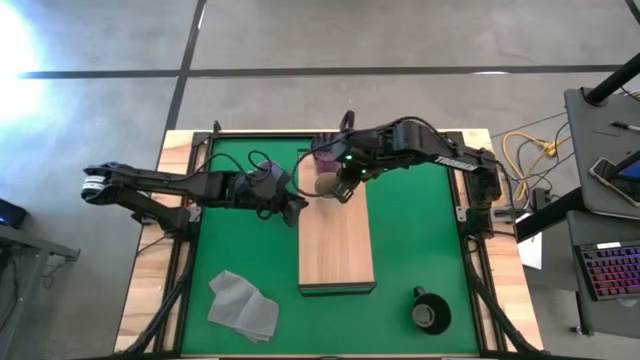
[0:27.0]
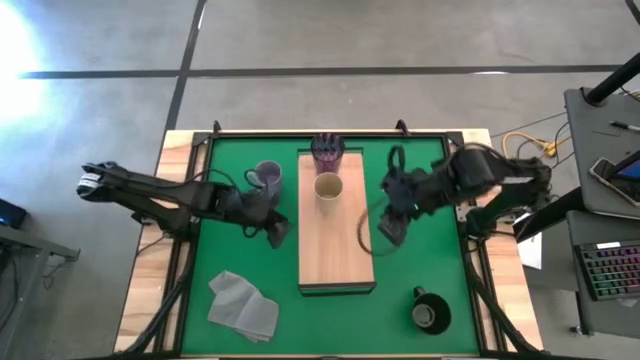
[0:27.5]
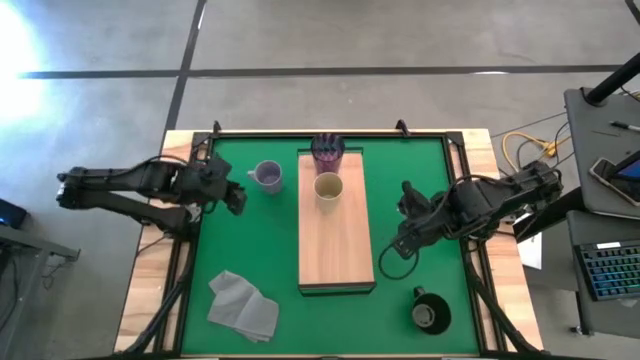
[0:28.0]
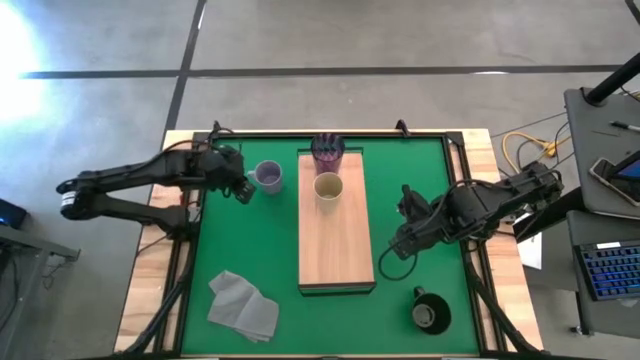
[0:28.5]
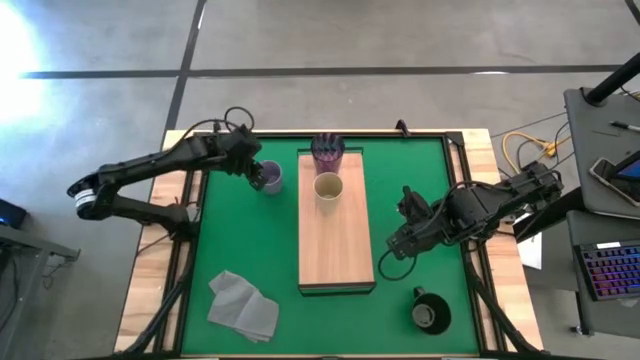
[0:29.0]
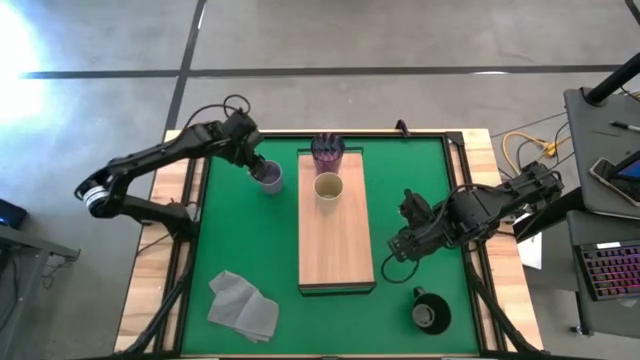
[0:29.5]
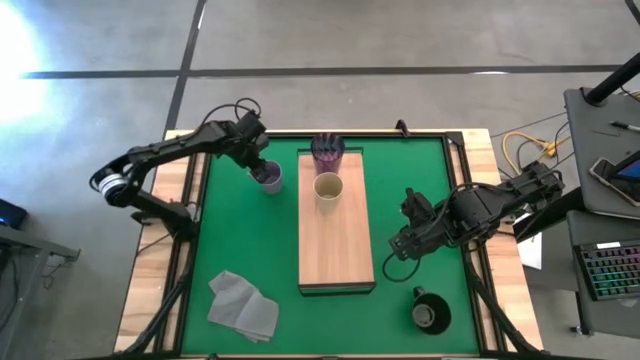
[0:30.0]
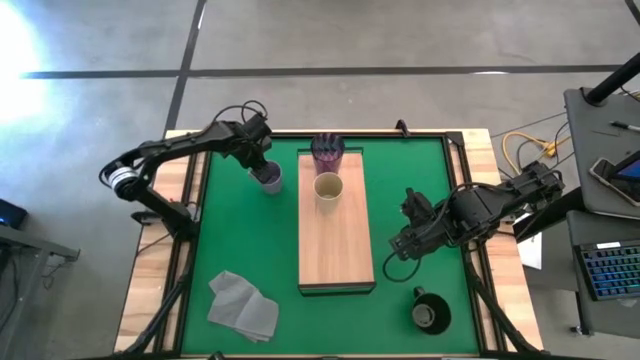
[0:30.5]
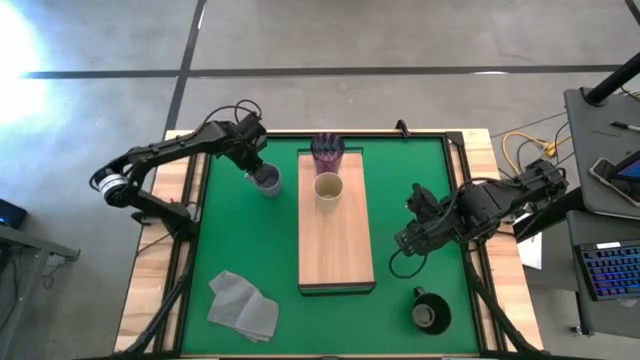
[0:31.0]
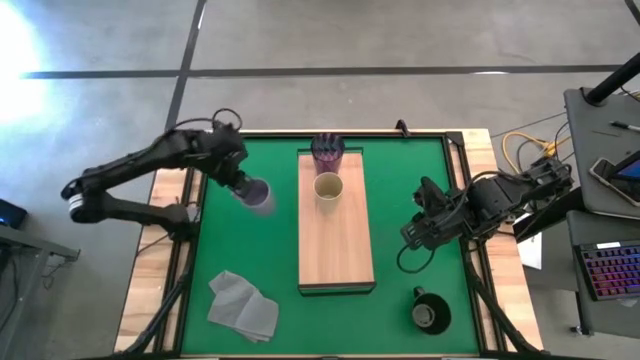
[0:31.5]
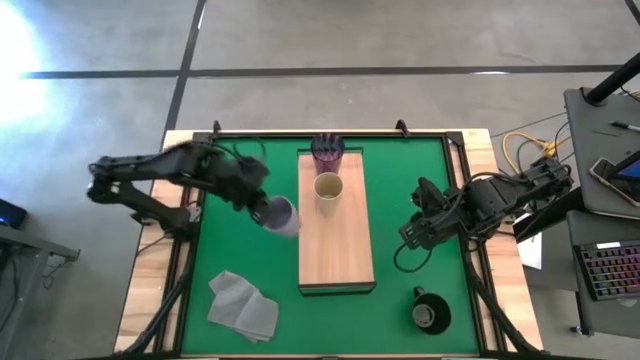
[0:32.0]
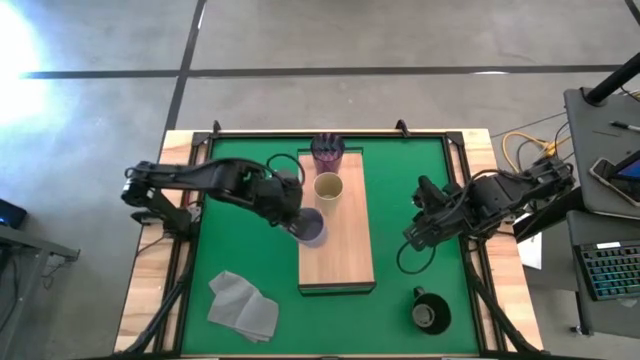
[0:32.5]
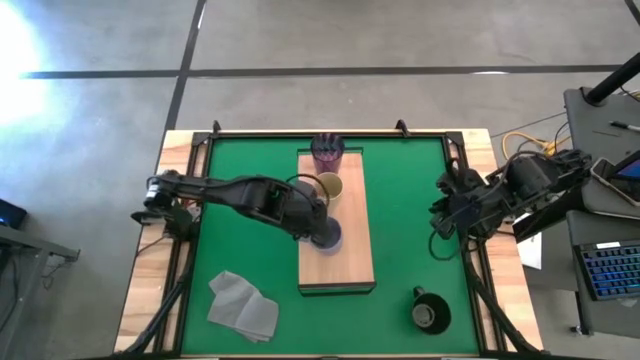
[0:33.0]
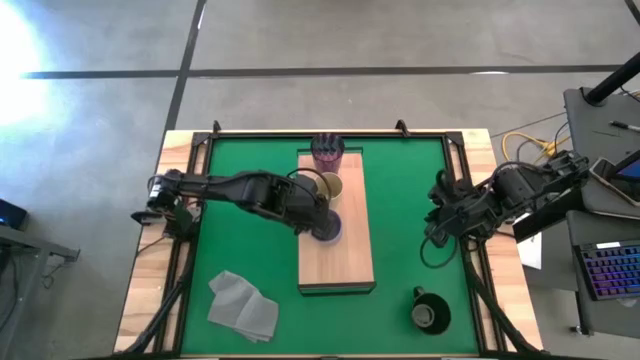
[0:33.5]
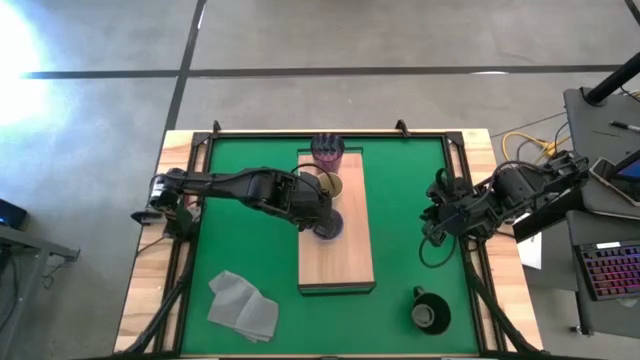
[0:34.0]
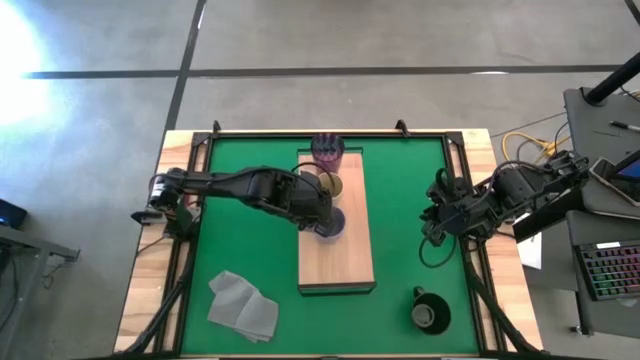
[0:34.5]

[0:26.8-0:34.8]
Task: Stack small to large cups/mugs on shelf
Put the blue mug on the shelf

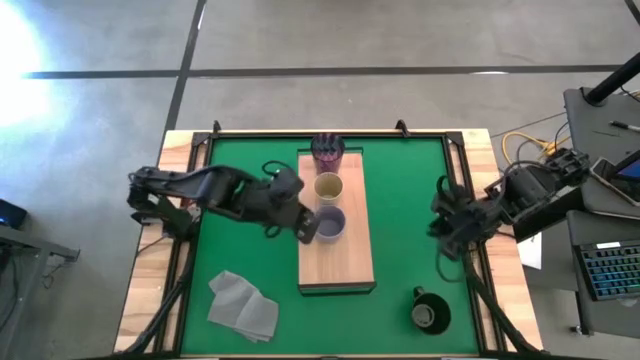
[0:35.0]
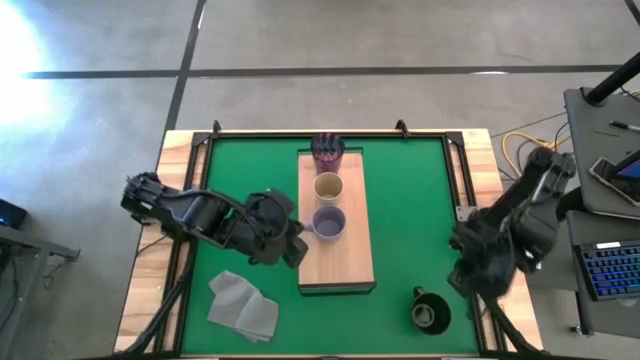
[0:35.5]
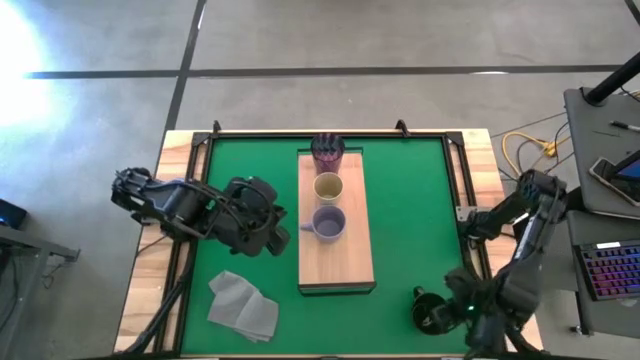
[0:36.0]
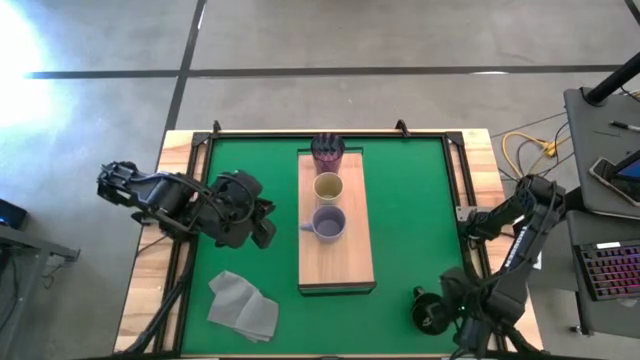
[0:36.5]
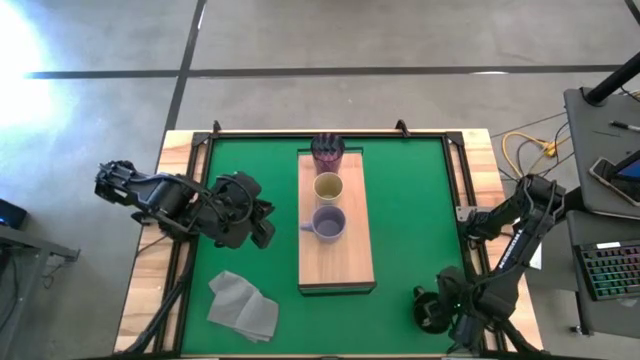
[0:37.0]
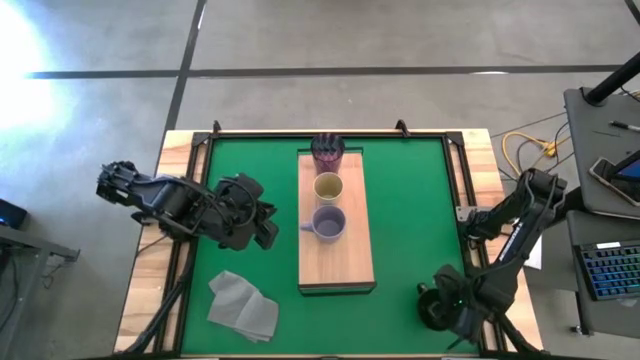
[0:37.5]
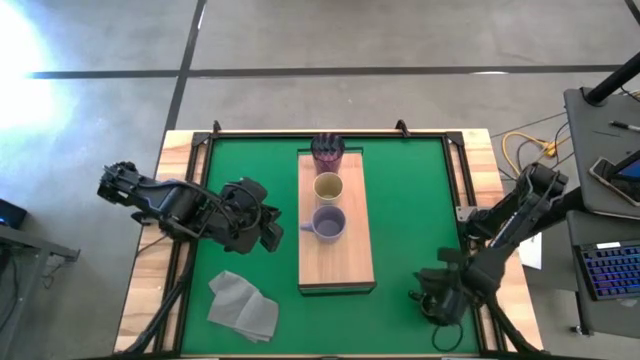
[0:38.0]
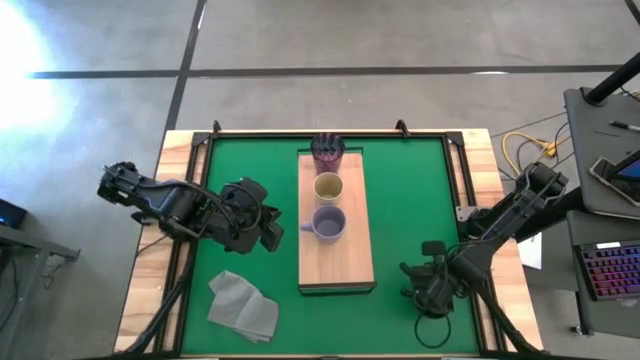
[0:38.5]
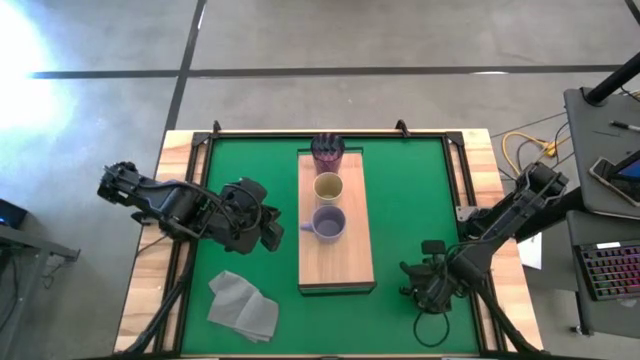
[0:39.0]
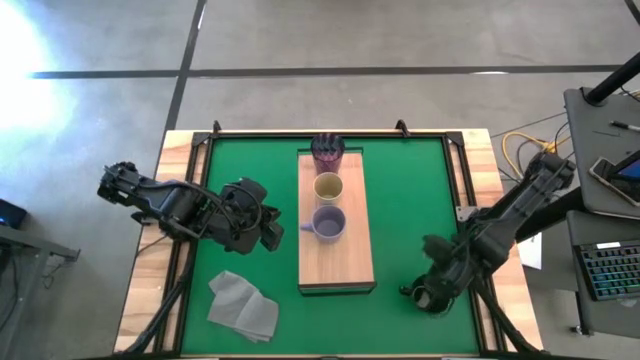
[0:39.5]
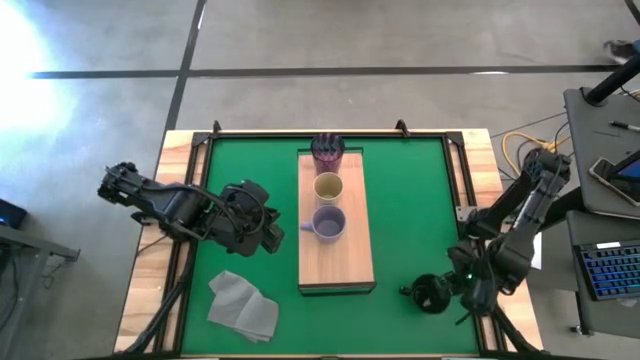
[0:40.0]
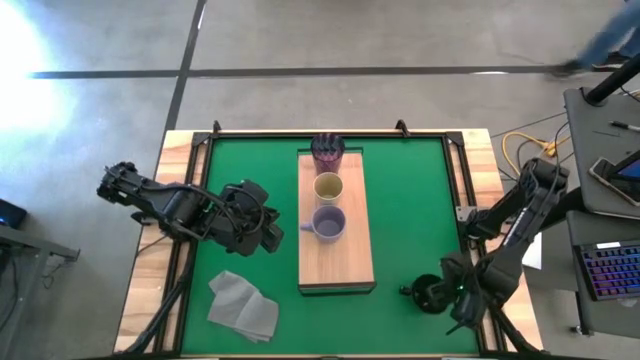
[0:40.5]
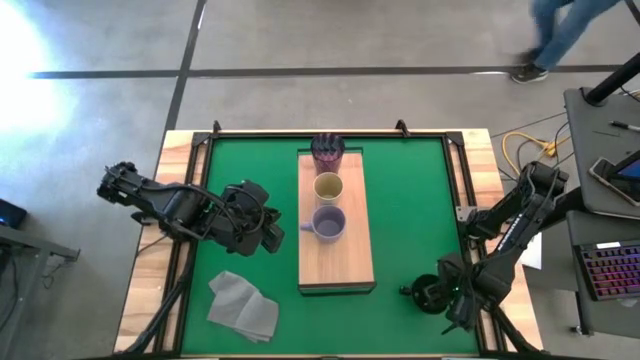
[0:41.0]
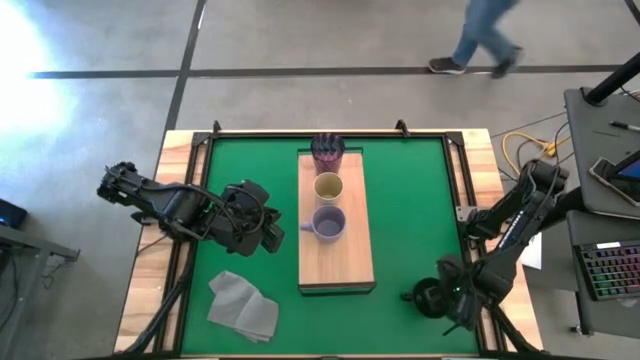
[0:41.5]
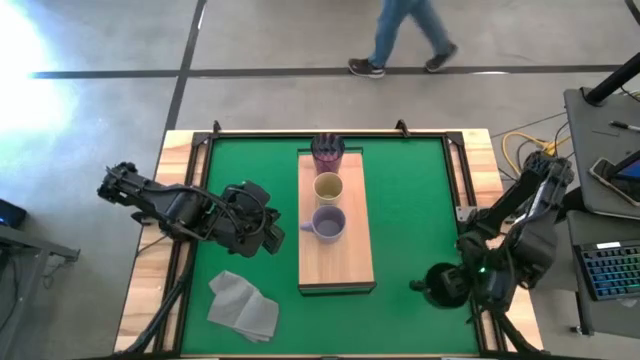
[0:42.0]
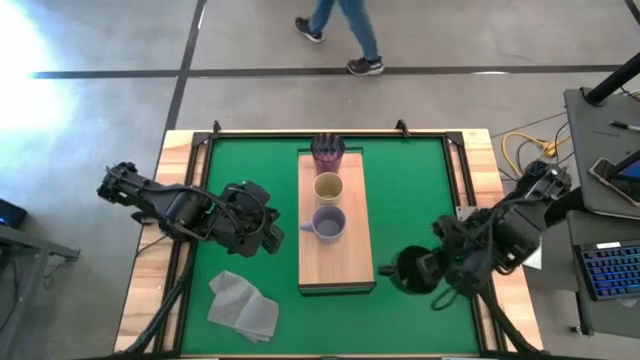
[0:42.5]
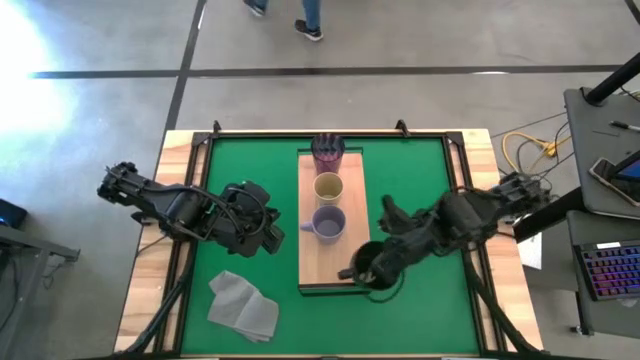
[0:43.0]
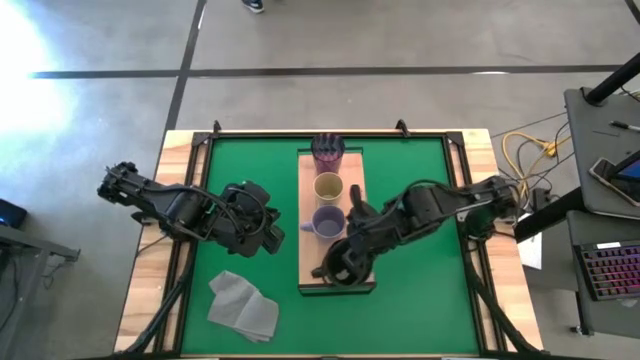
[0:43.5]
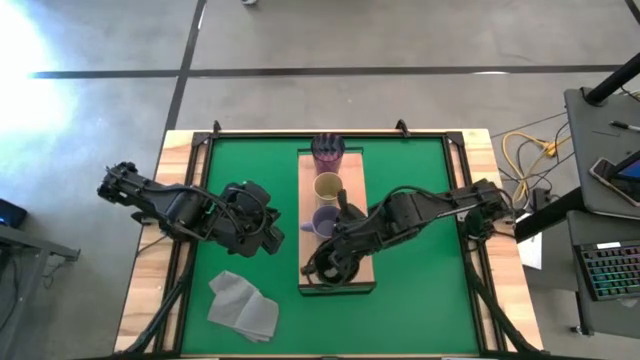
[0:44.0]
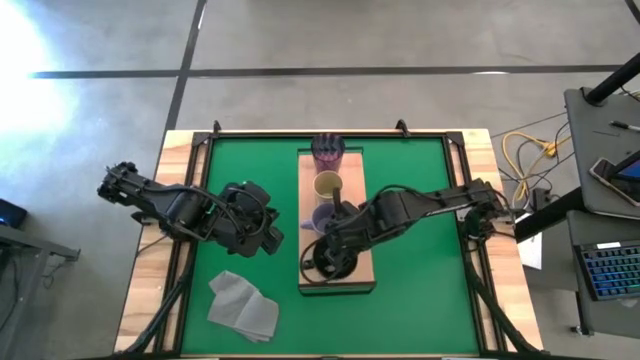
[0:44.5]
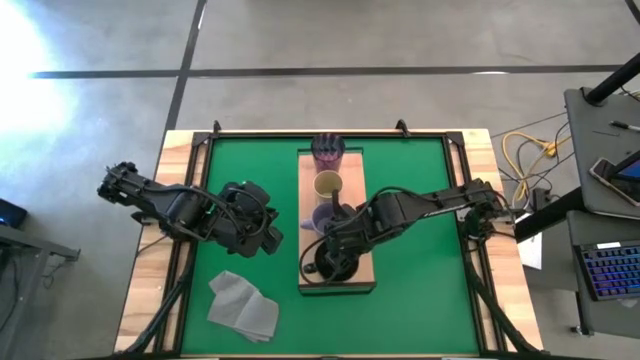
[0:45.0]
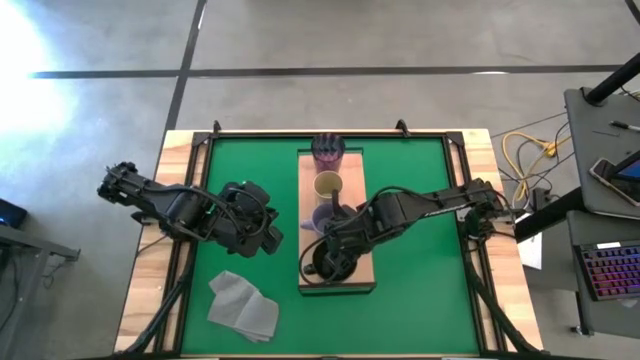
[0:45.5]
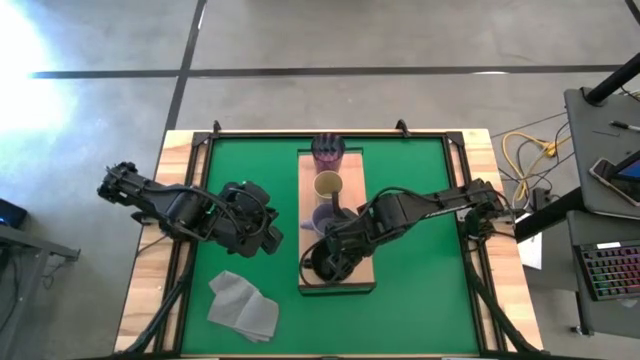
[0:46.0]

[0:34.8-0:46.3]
Put the black mug on the shelf
